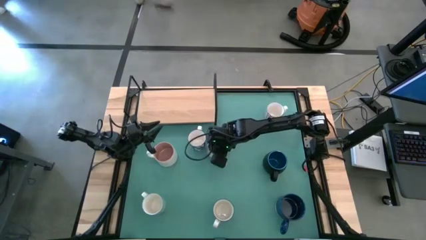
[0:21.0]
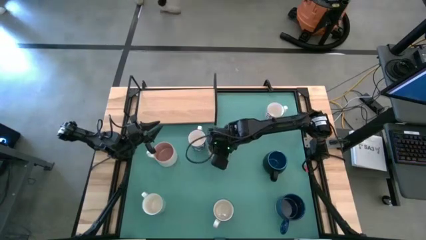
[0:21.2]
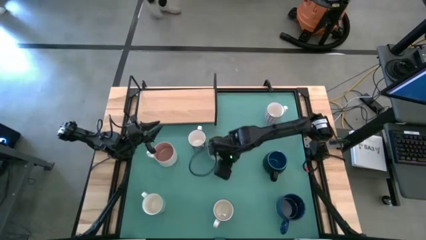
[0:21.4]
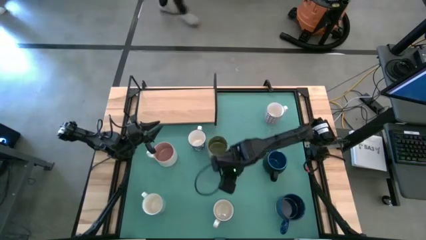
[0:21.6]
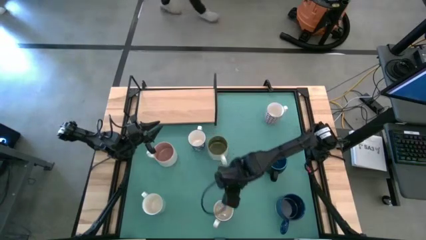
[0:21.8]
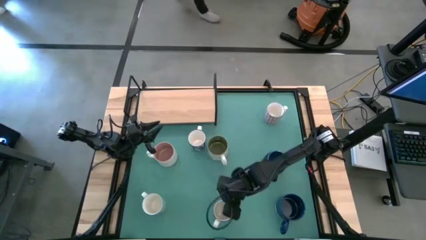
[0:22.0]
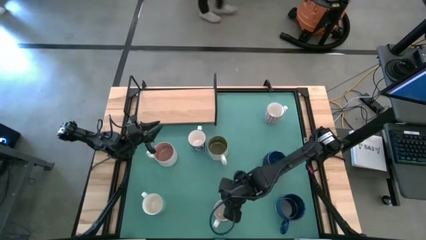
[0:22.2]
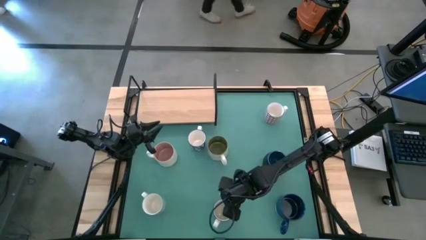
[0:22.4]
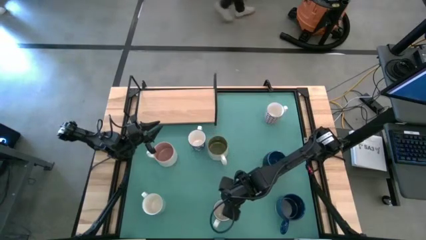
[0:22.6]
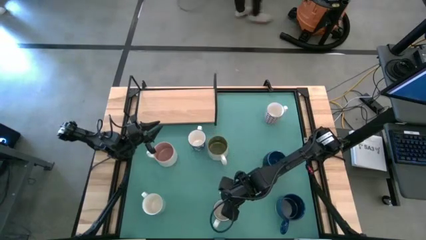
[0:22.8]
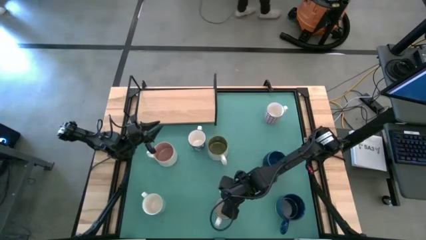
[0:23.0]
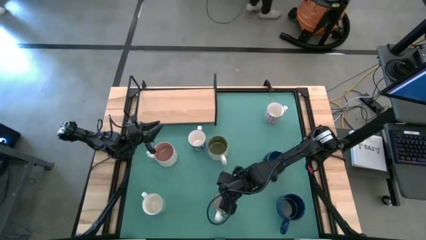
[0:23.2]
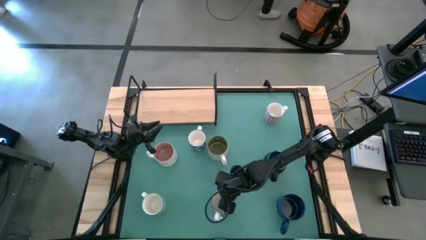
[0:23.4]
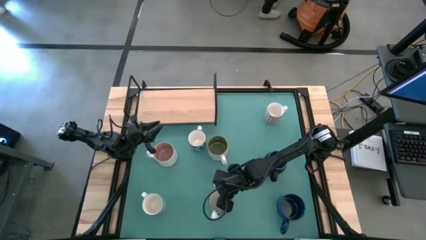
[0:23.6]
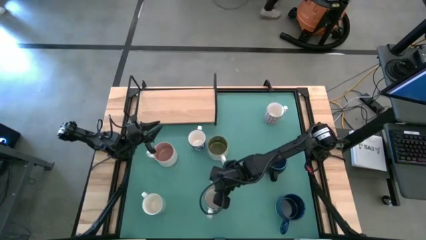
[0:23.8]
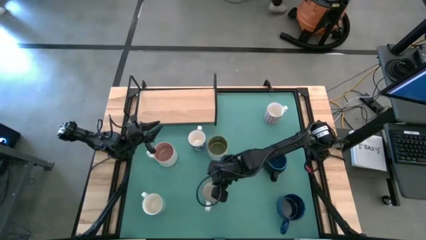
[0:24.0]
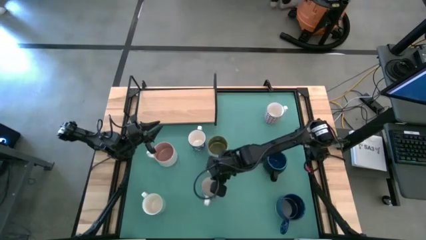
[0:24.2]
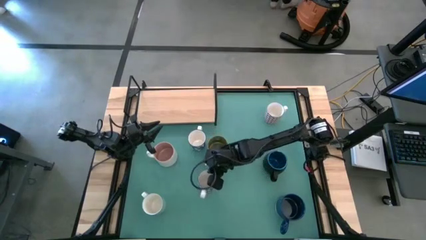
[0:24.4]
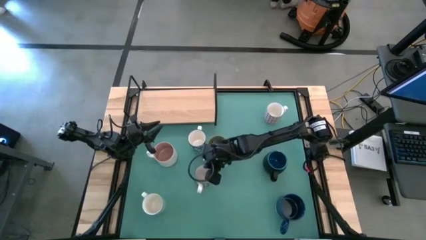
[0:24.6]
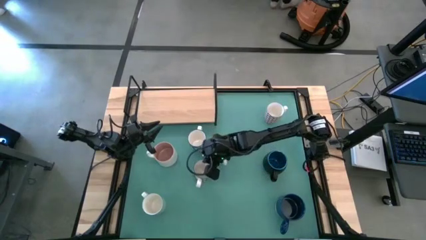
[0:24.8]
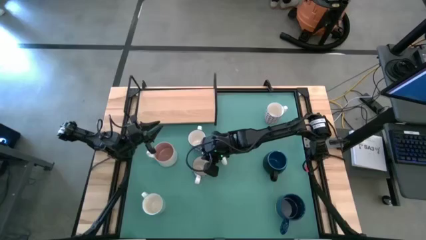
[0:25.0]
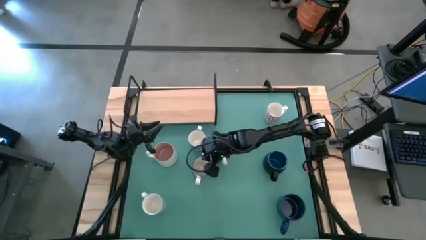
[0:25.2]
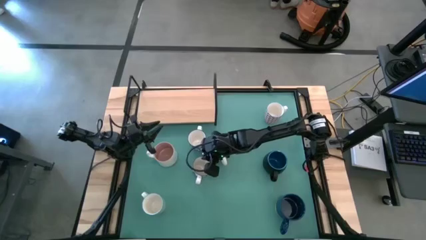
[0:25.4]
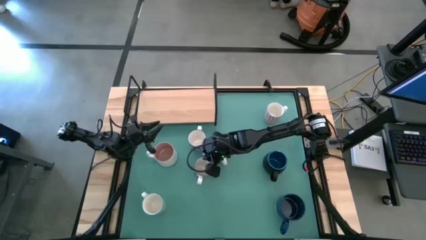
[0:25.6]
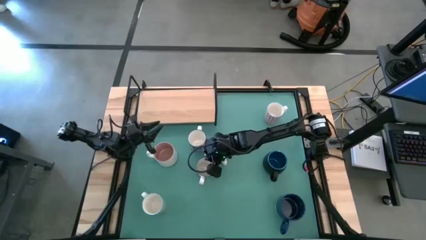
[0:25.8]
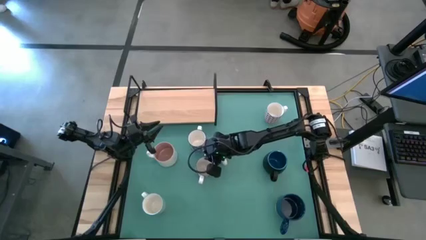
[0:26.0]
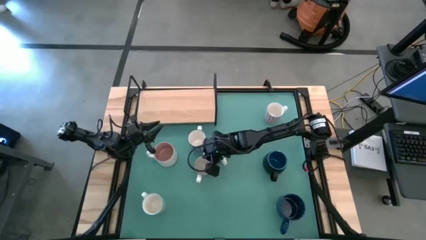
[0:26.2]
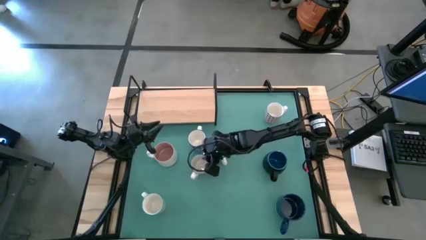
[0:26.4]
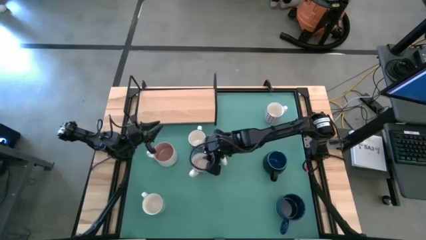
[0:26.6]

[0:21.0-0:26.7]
Task: Place coffee mugs
Move the bottom blue patterned mug to the middle of the table

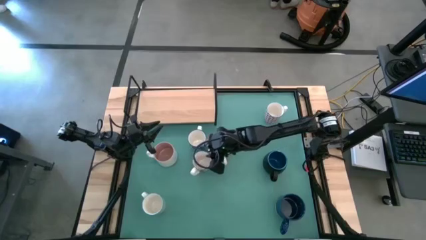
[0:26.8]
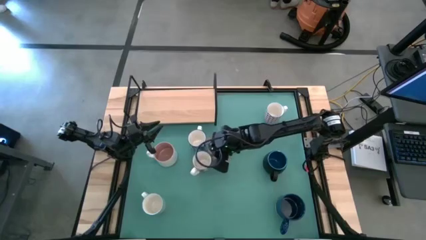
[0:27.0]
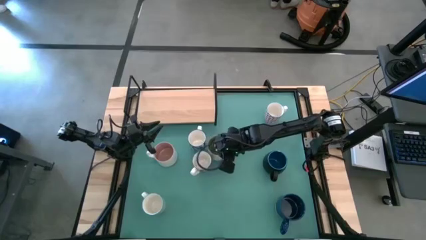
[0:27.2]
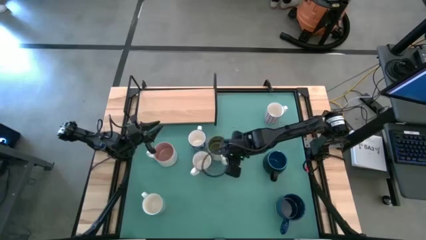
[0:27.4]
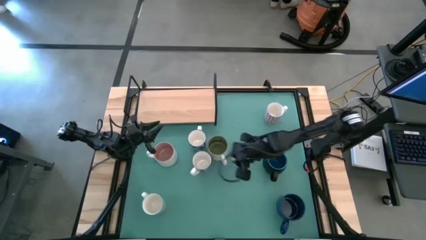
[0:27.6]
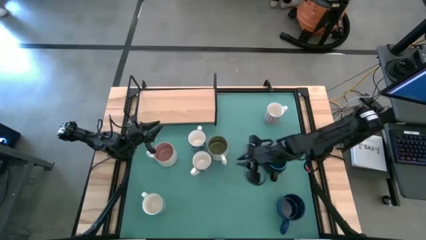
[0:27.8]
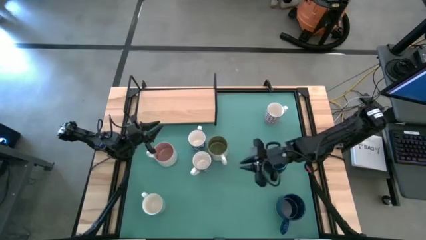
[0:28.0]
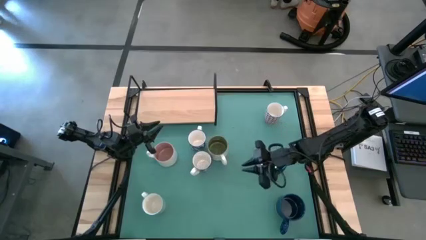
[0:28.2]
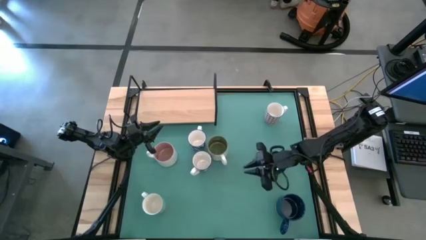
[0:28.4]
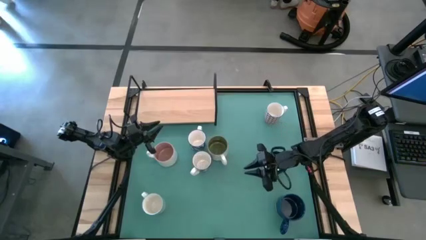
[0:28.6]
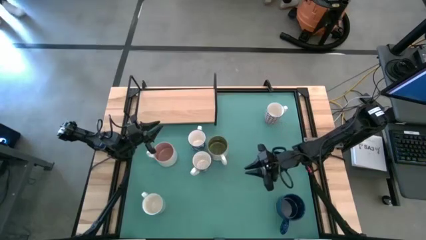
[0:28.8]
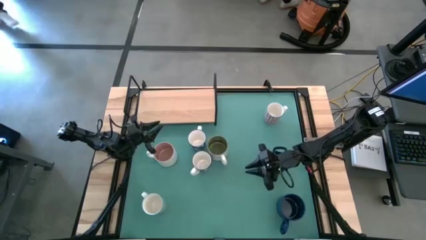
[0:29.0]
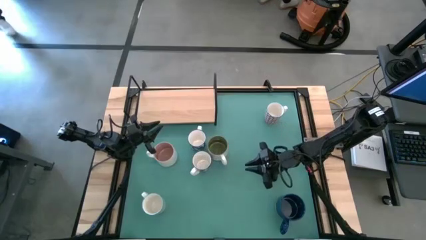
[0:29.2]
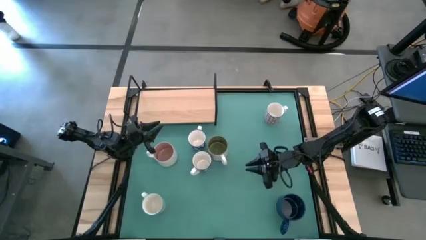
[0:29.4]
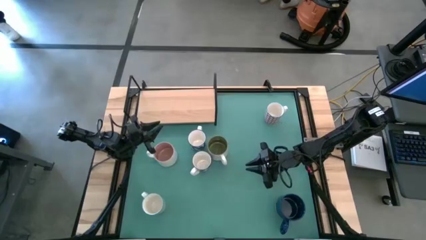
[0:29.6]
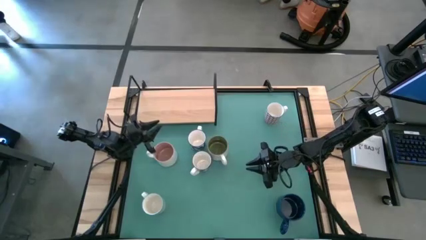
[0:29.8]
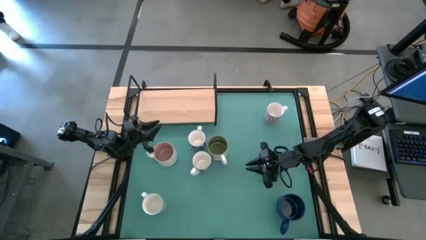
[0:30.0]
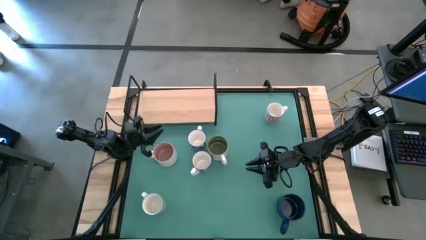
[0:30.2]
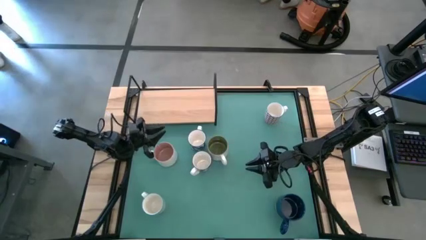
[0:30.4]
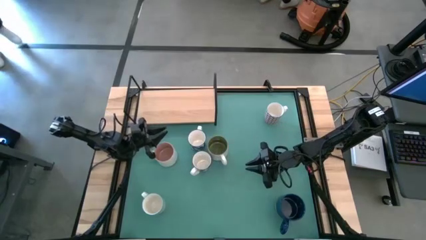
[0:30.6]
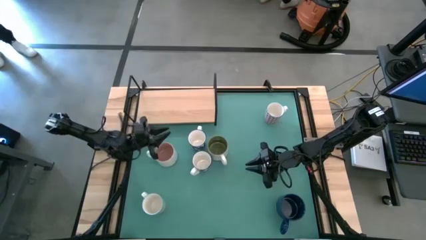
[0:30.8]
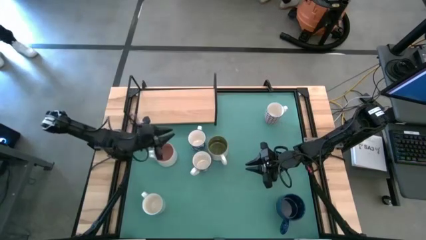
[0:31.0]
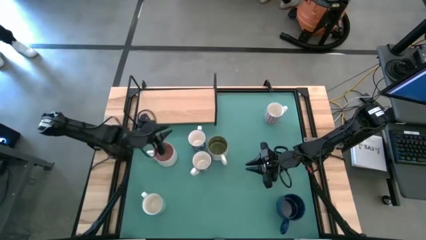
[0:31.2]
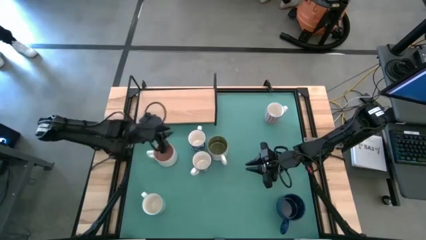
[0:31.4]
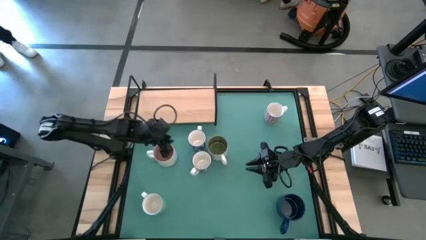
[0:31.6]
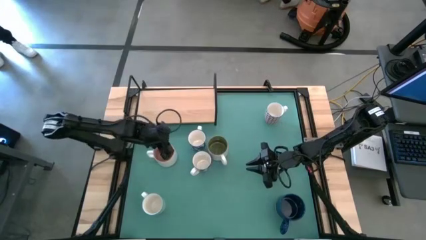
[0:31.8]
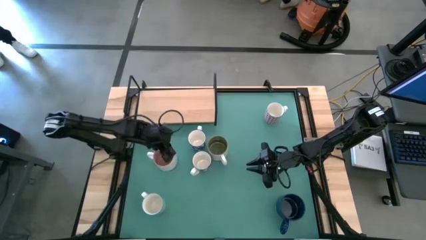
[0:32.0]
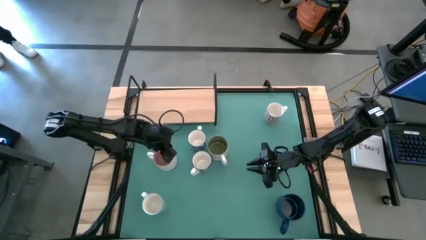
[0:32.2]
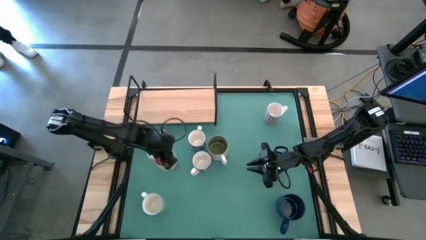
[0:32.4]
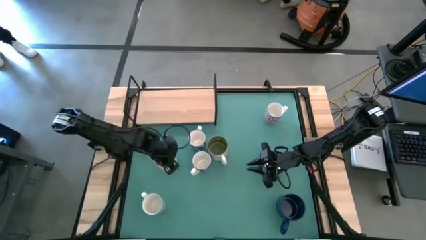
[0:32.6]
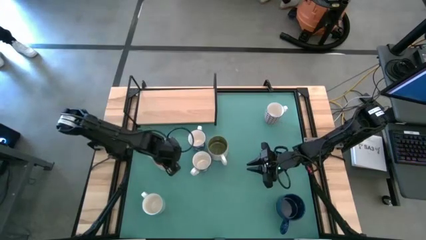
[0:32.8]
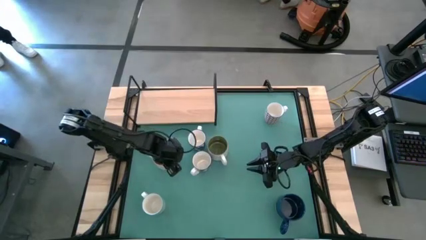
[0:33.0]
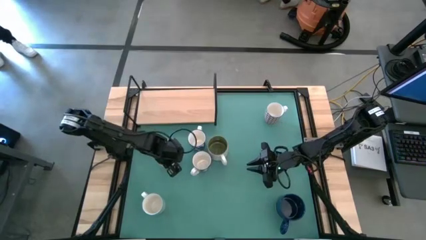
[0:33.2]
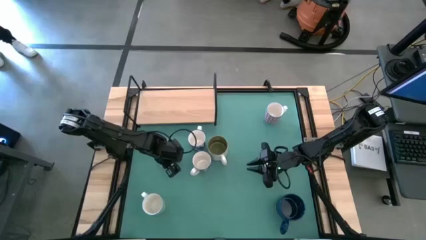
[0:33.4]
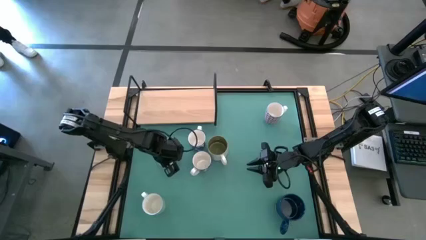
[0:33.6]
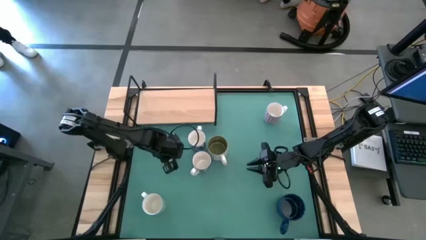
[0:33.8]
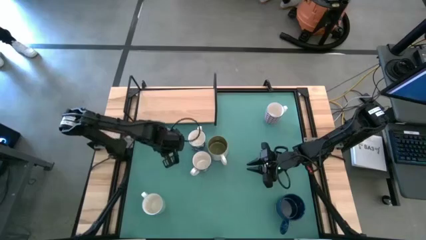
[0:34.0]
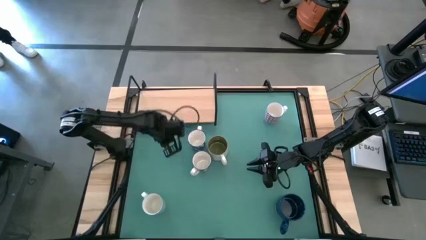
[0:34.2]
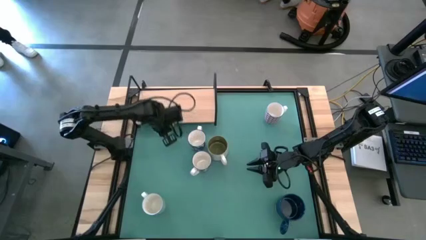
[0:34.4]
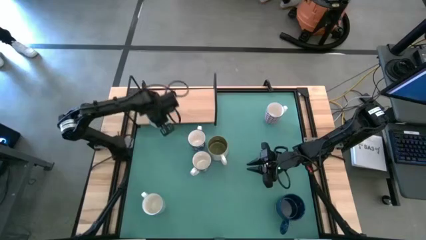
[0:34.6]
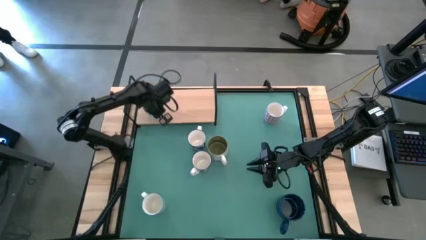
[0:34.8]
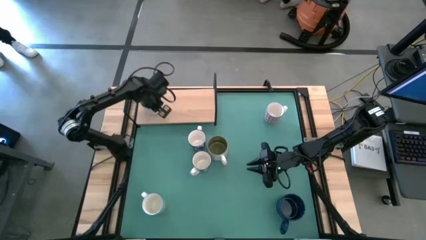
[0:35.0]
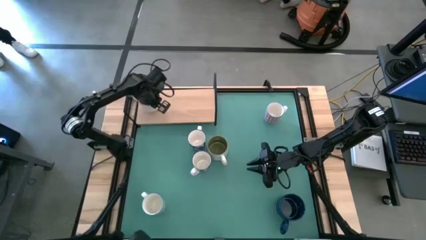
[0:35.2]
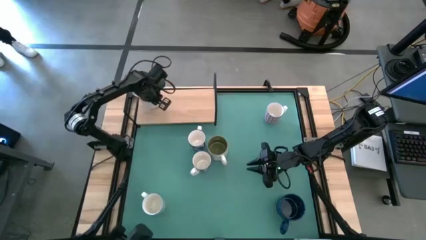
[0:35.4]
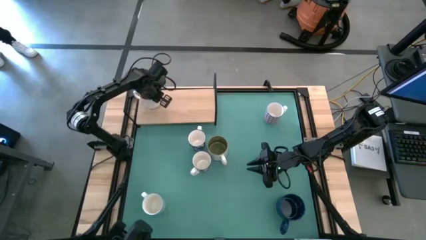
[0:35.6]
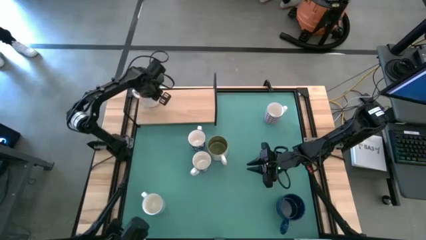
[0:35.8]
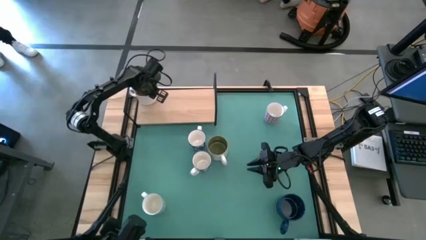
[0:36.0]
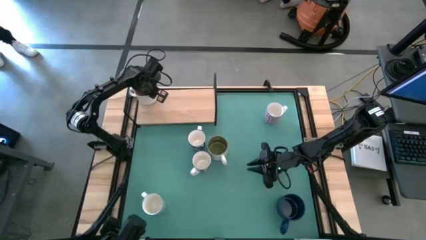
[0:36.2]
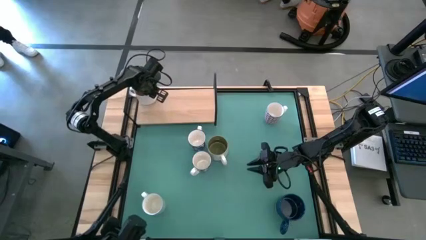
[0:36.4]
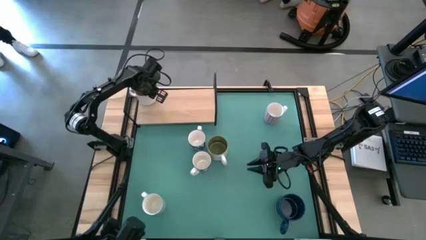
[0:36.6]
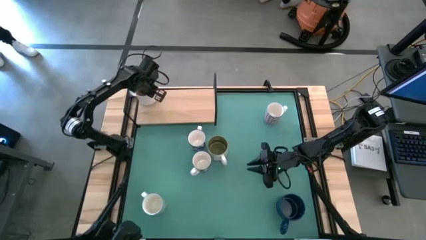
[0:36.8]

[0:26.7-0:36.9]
Put the pink mug on the shelf
